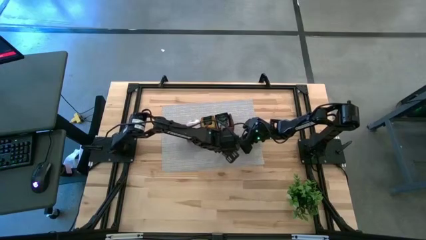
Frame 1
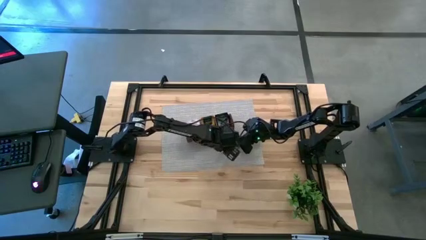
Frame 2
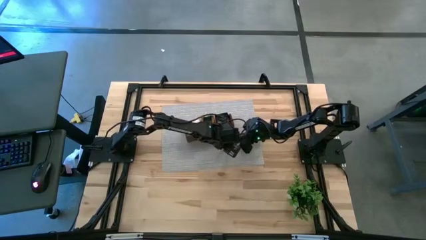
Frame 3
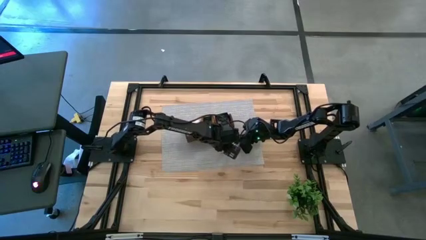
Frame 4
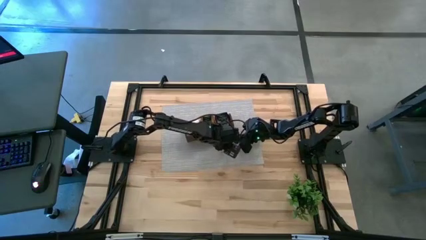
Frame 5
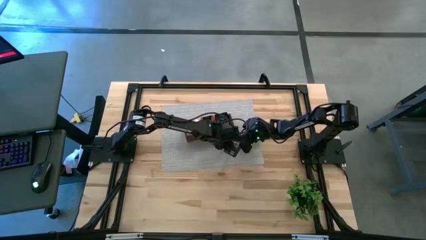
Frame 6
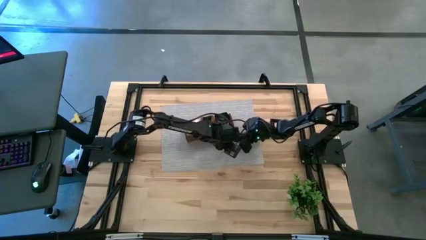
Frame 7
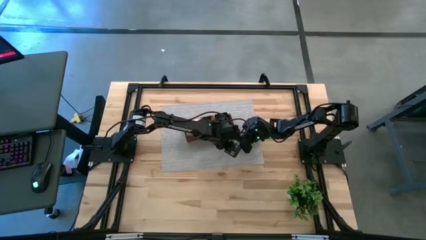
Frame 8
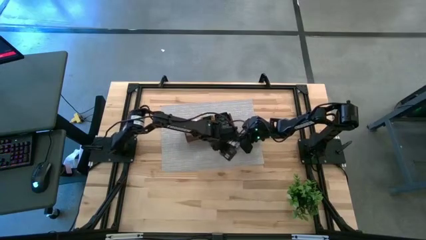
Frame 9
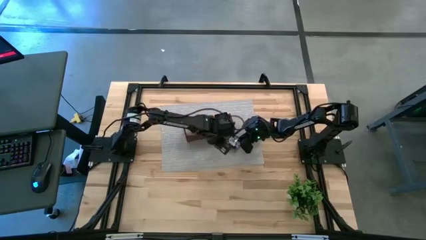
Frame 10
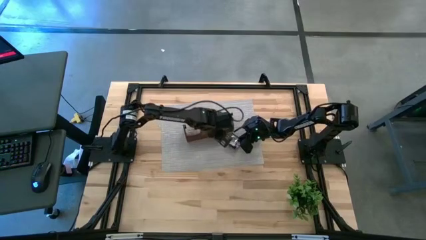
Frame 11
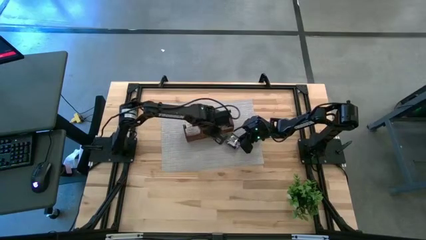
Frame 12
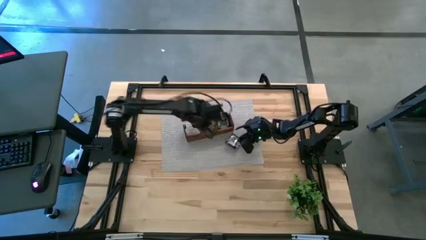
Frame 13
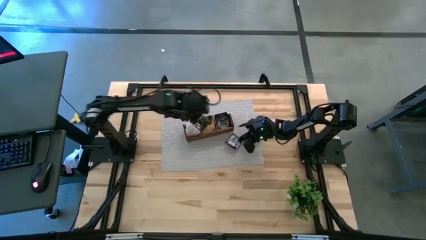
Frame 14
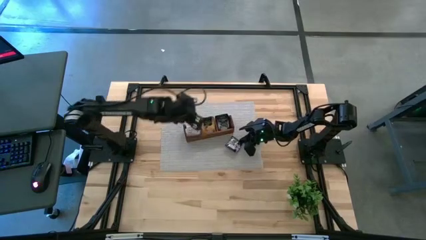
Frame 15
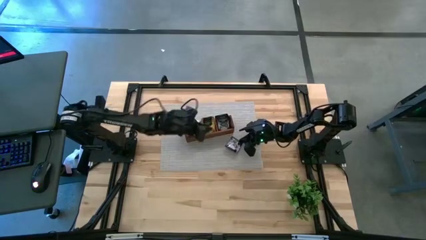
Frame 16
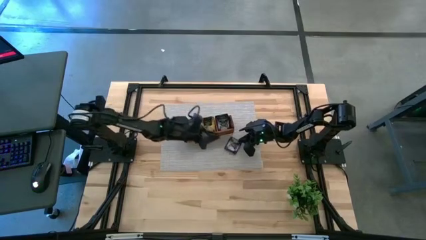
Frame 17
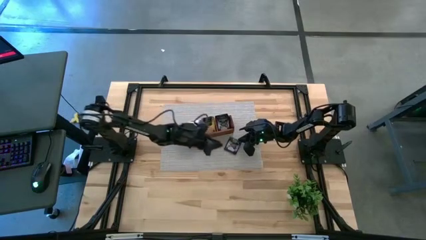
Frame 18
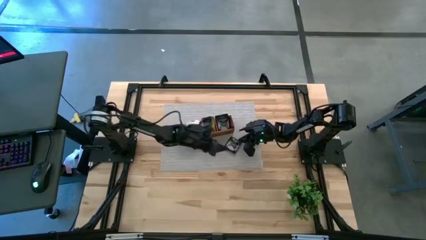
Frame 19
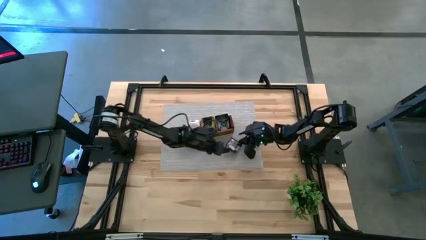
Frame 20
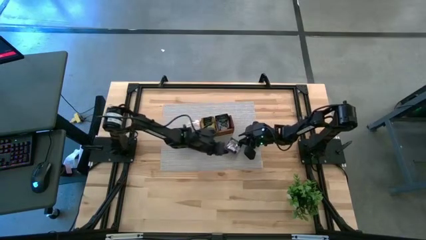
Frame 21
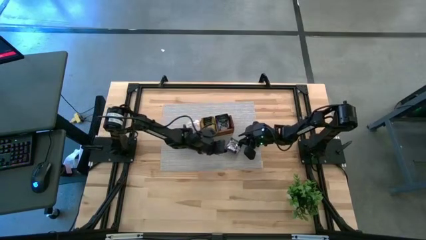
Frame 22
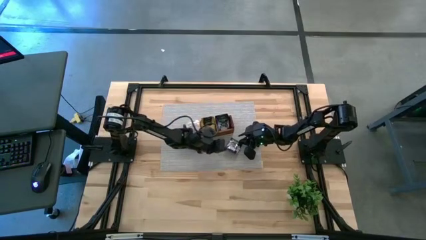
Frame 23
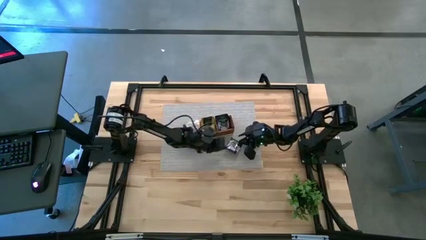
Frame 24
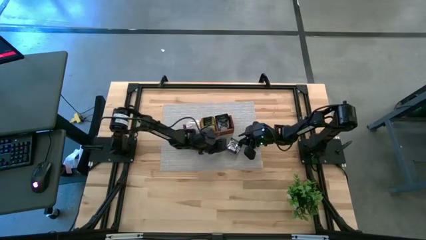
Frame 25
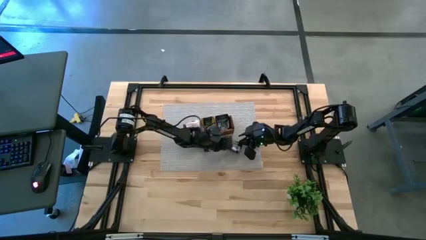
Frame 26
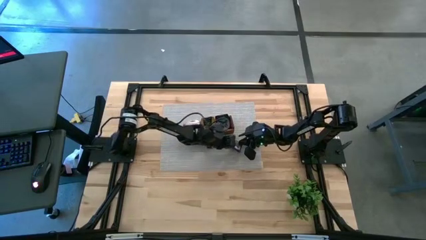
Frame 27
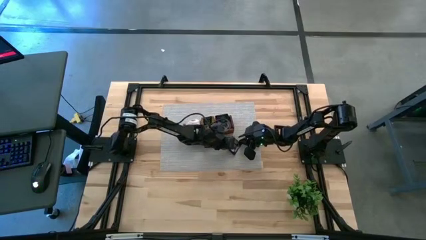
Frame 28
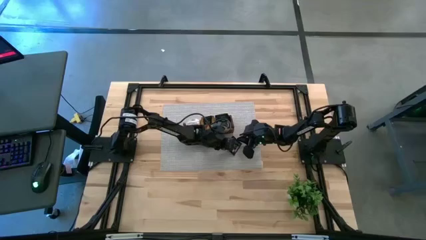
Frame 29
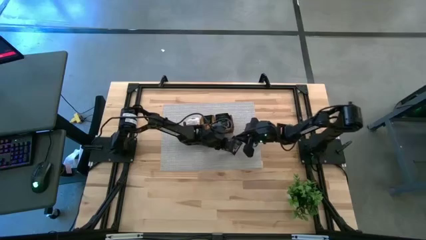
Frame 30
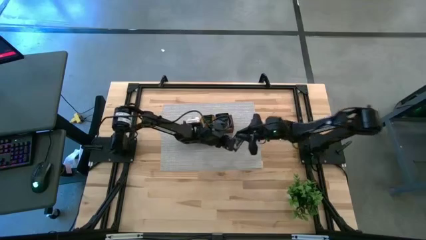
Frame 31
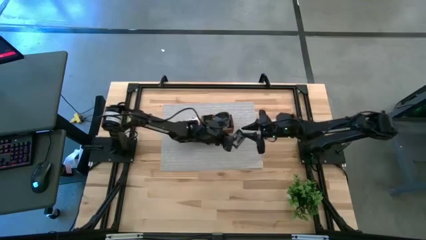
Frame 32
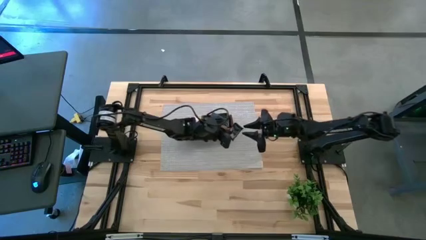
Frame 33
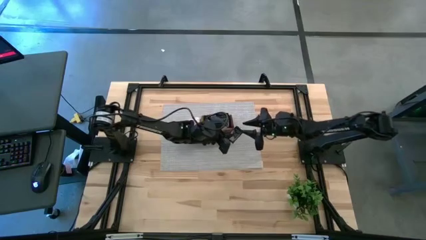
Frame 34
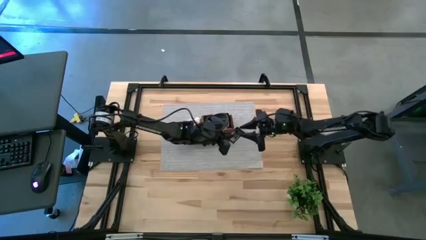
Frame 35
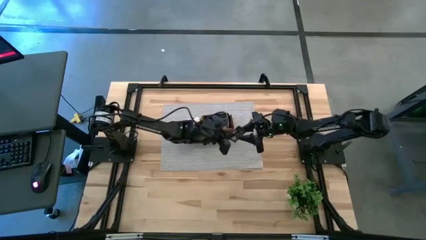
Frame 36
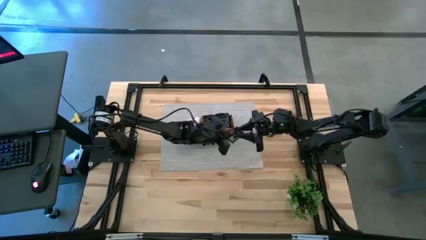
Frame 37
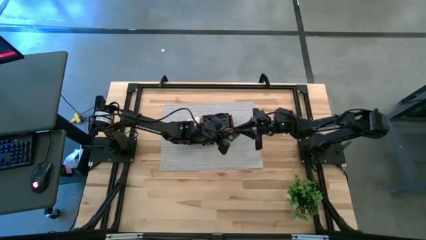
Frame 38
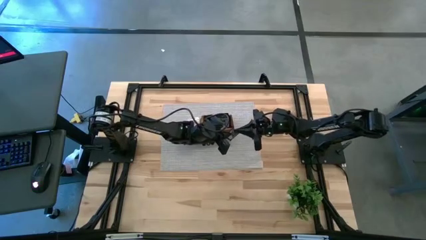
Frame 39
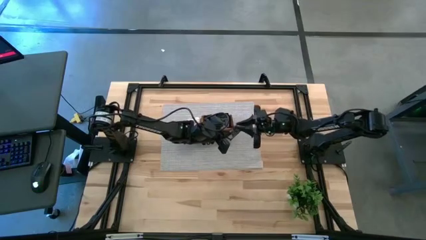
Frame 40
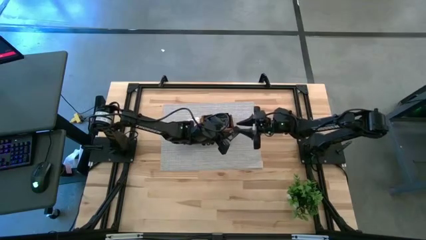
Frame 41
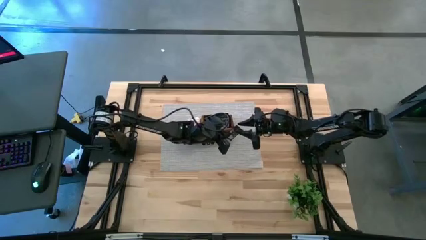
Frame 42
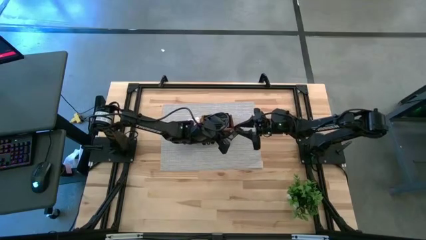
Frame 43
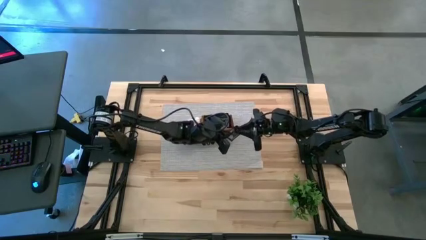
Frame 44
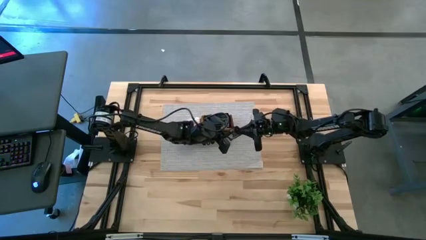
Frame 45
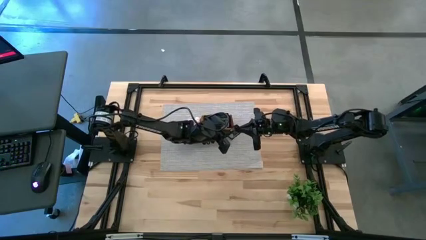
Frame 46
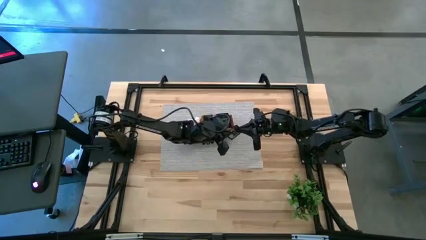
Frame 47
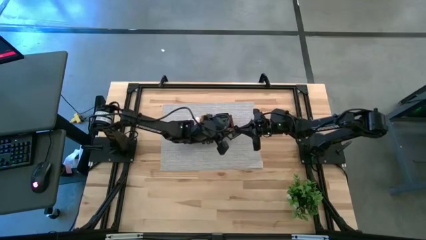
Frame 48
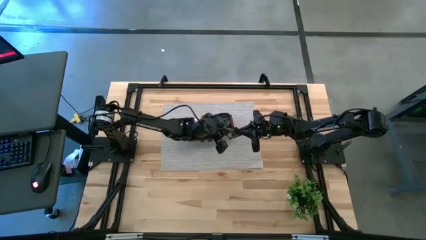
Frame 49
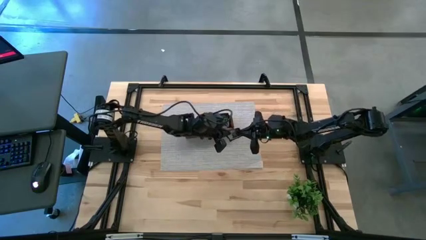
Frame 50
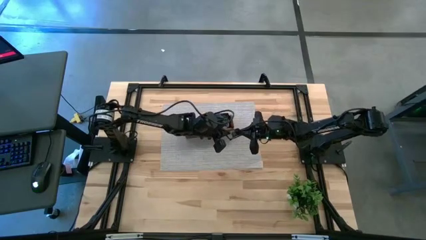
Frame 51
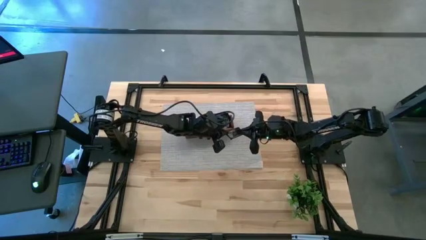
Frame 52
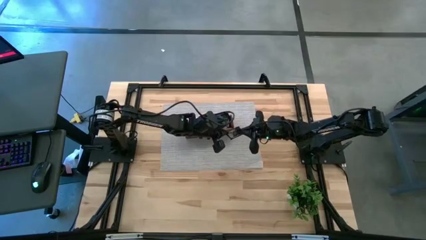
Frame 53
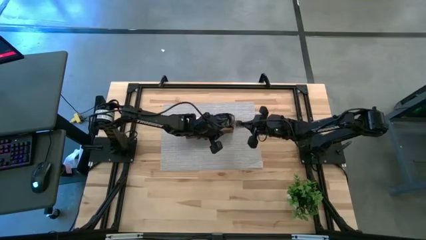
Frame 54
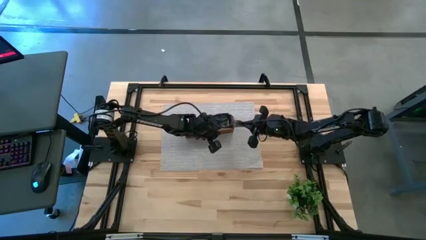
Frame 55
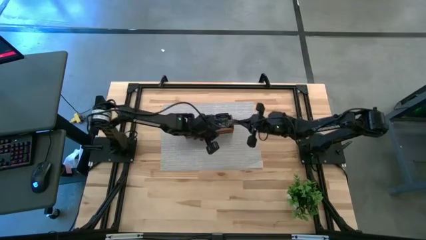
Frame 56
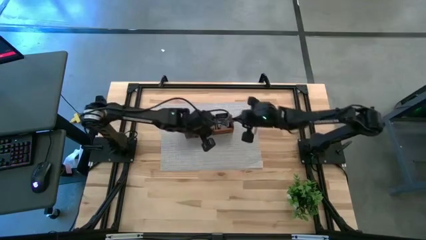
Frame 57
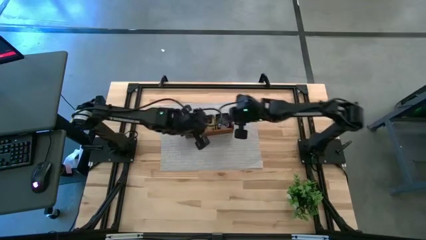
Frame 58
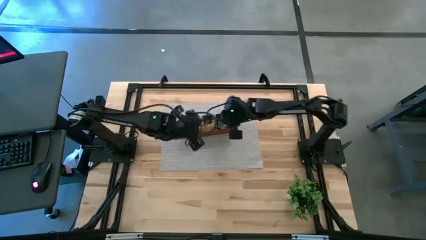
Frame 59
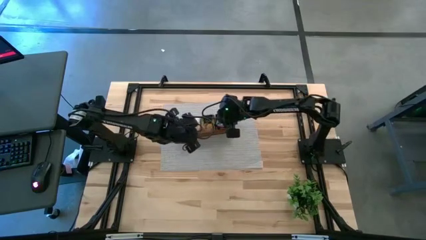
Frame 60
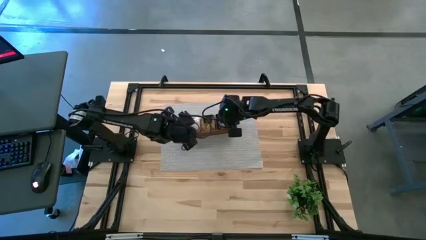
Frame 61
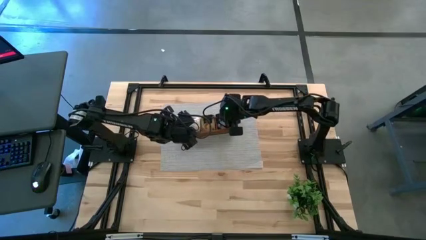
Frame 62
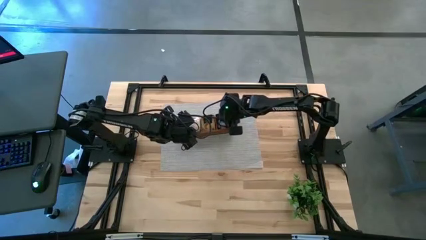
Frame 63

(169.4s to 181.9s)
Task: Pick & Place Tea
Put the violet tea bag into the right section of the wooden organizer

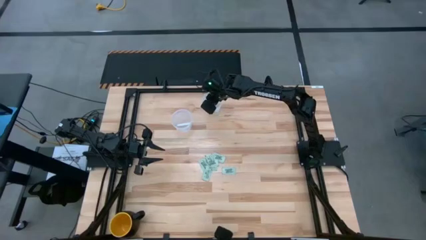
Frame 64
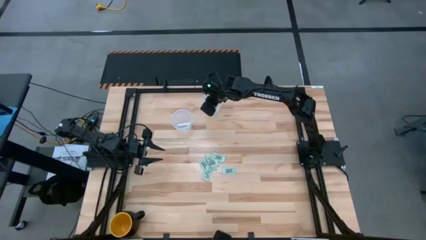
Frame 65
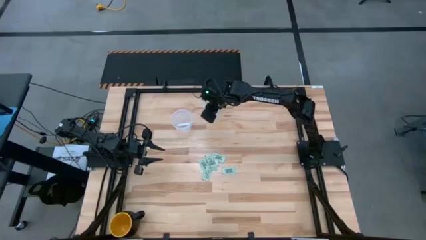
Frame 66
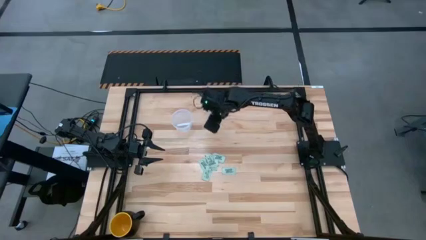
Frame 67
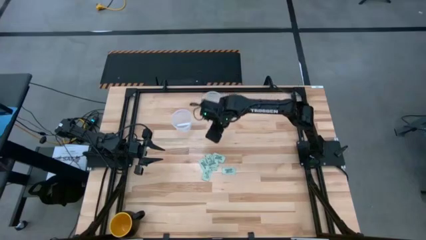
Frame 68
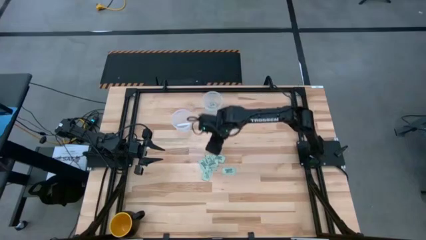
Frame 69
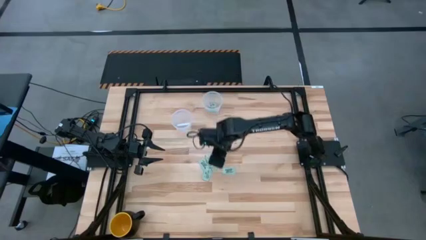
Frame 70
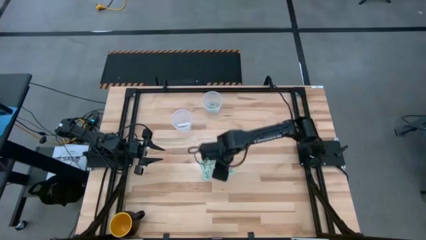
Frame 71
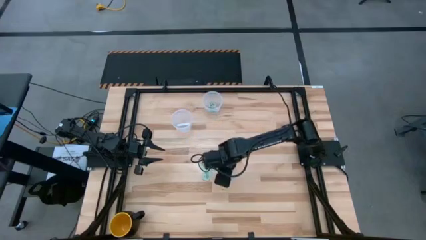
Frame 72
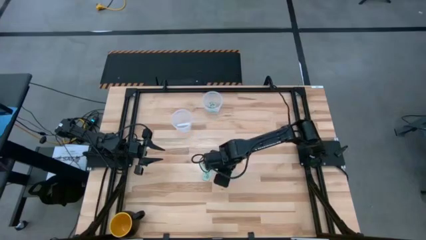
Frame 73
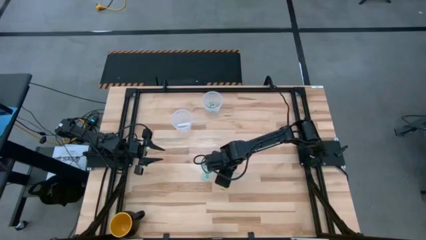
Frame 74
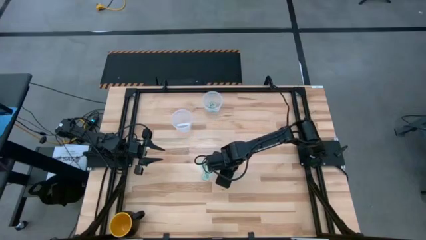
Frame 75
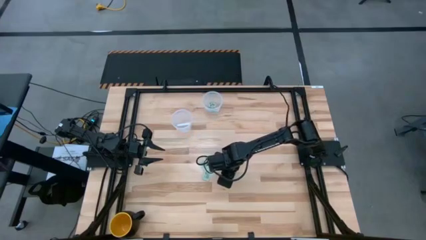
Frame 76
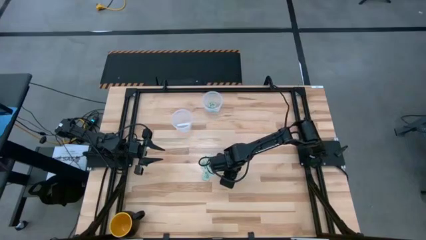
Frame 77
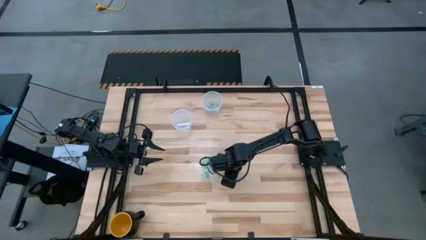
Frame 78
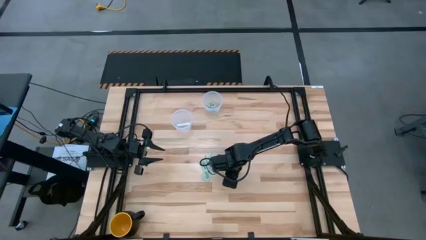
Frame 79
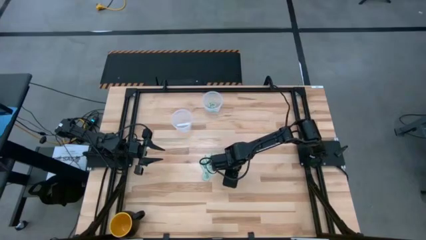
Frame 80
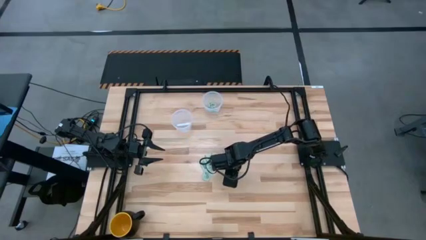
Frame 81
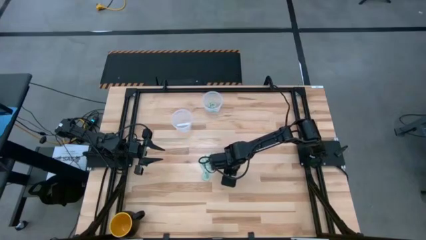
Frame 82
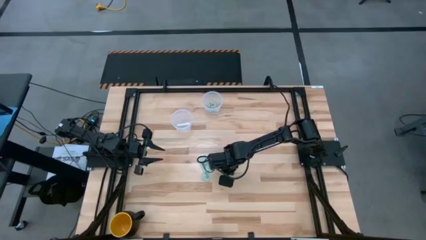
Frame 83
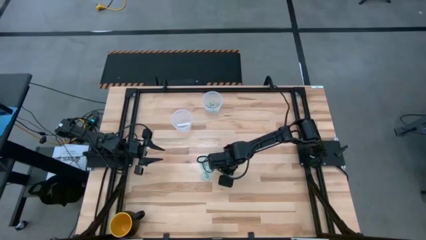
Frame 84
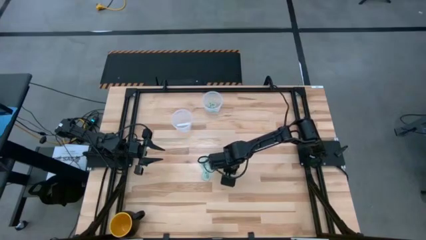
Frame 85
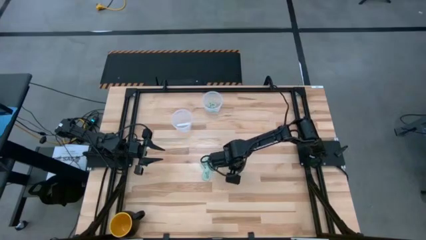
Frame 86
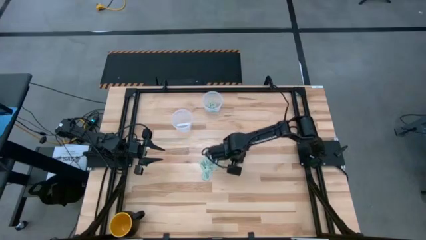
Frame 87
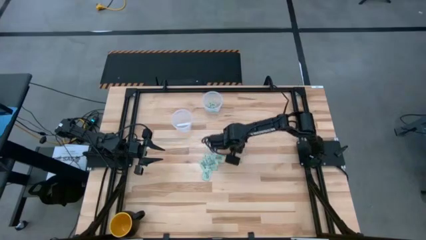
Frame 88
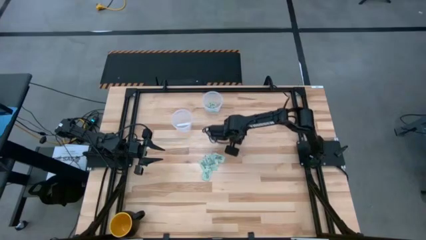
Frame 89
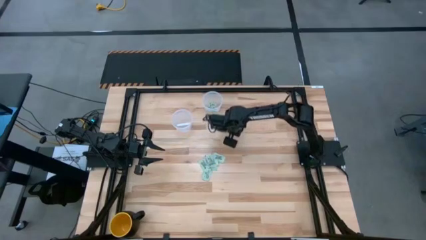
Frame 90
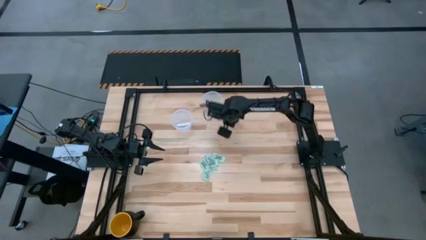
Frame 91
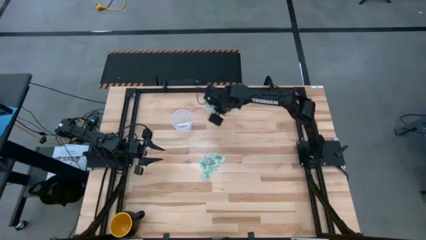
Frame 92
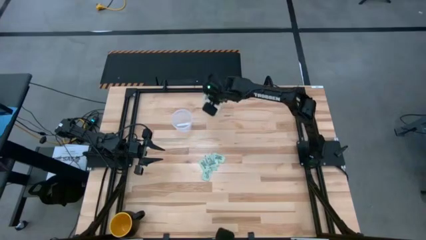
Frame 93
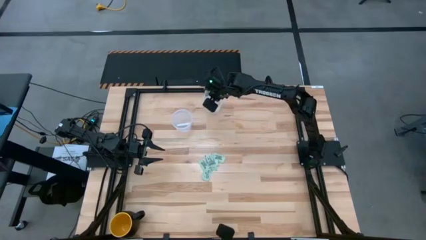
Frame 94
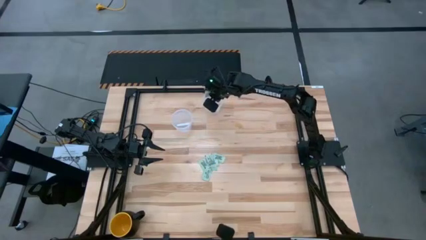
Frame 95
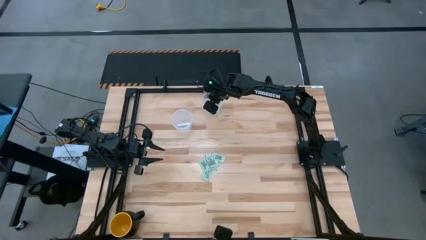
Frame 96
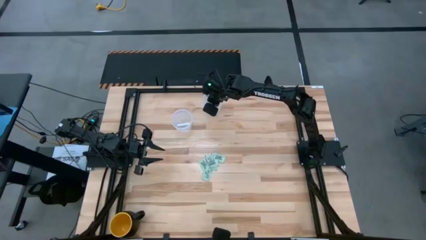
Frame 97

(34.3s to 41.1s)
Task: Pick and place items into bin
Put the stevia packet into the top transparent bin
